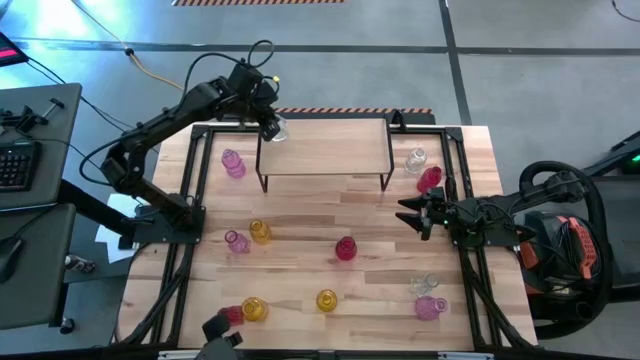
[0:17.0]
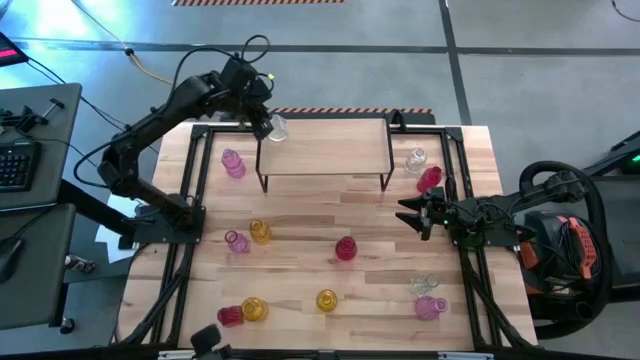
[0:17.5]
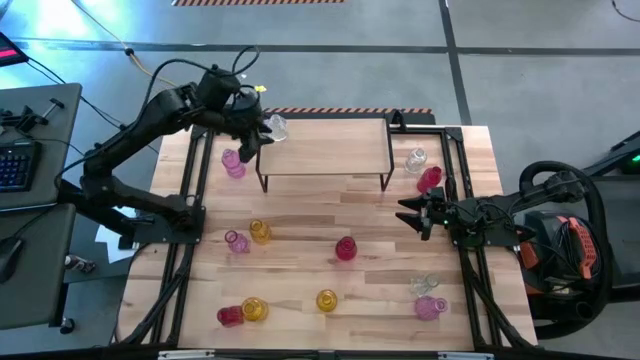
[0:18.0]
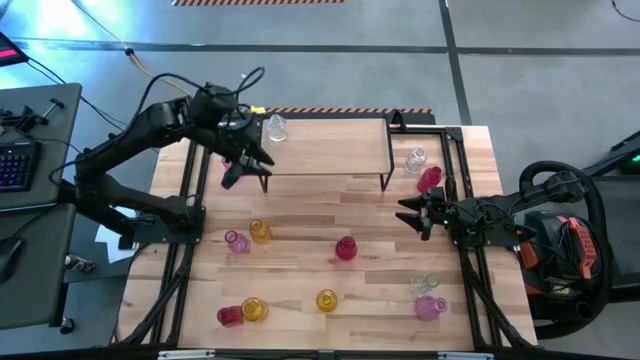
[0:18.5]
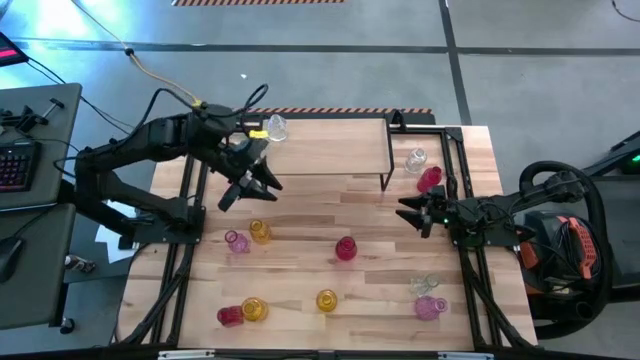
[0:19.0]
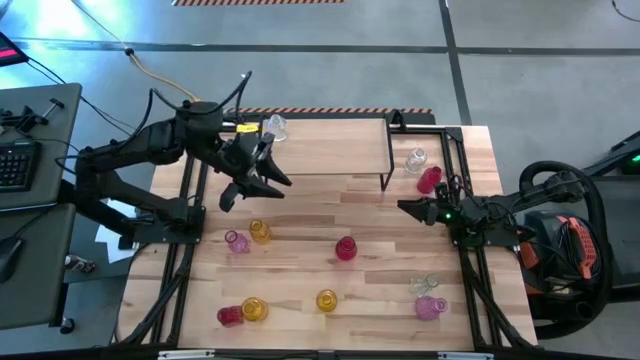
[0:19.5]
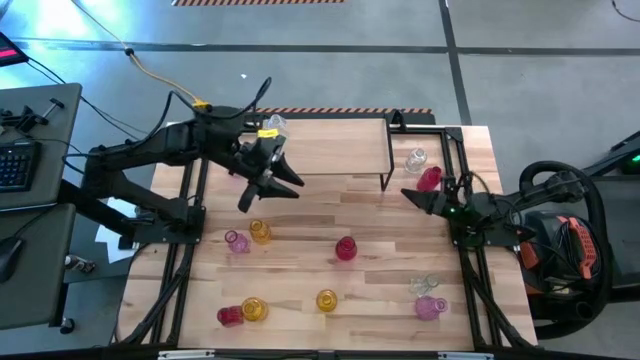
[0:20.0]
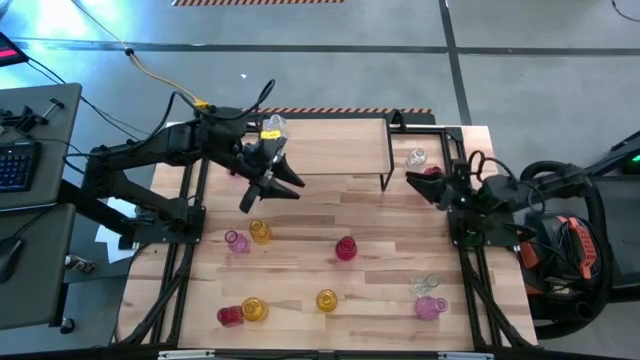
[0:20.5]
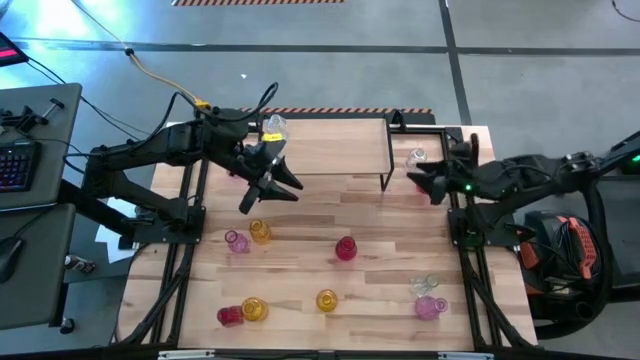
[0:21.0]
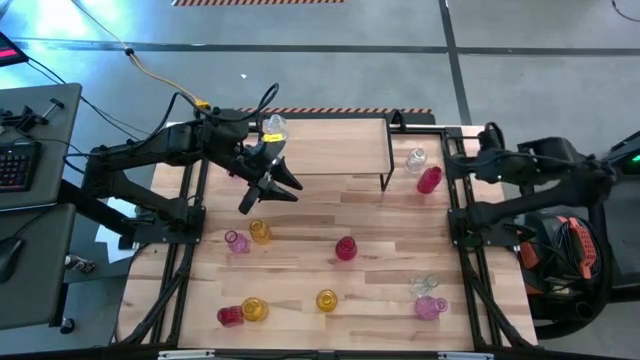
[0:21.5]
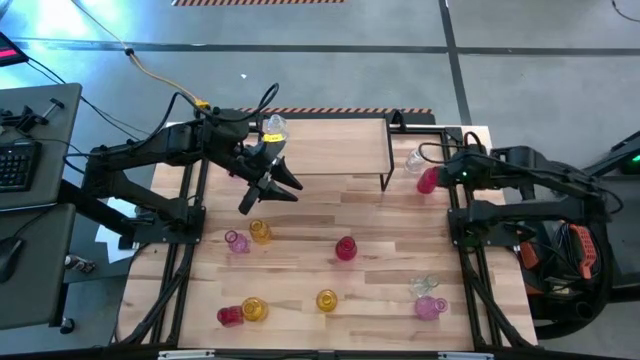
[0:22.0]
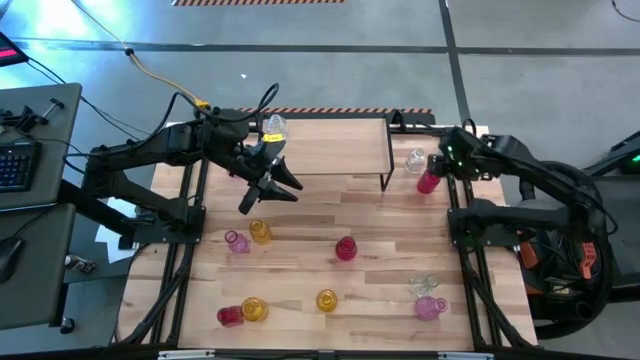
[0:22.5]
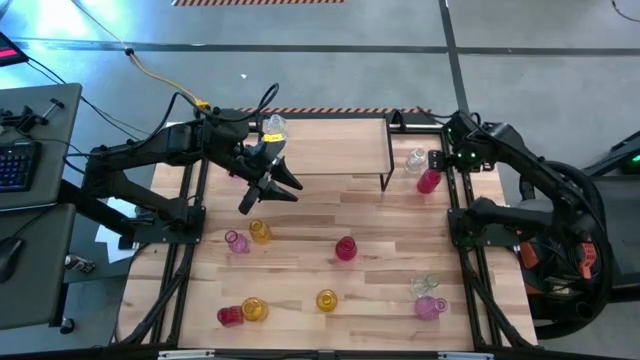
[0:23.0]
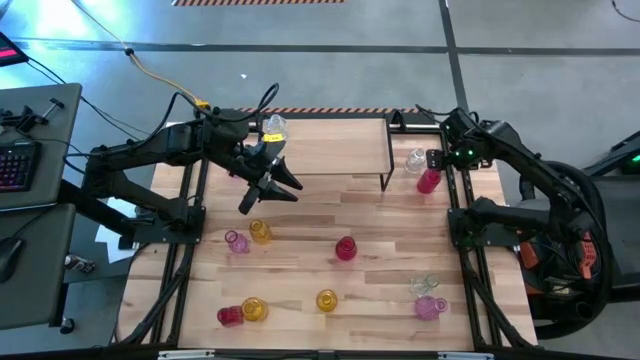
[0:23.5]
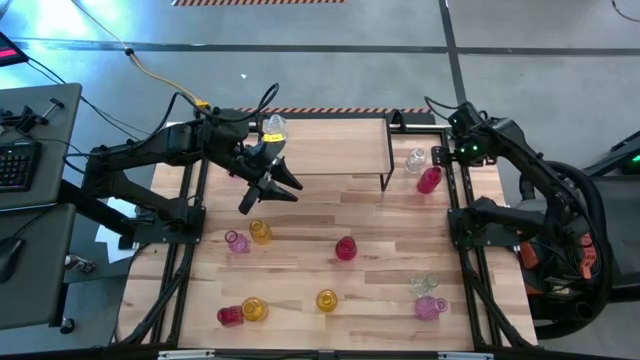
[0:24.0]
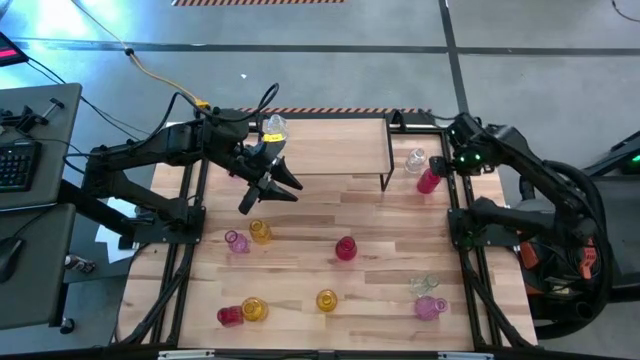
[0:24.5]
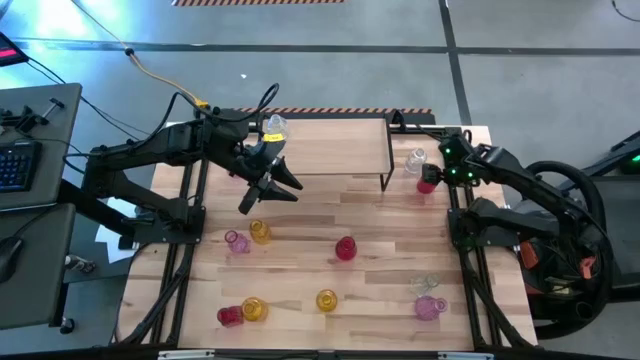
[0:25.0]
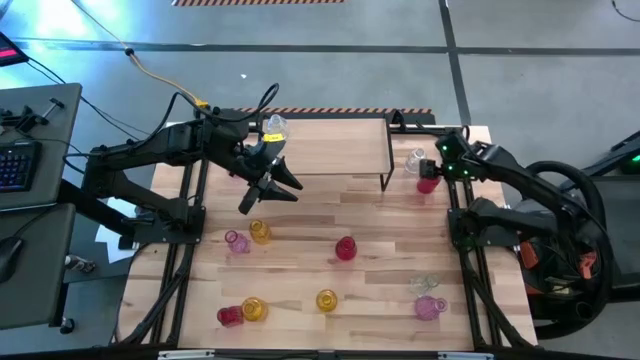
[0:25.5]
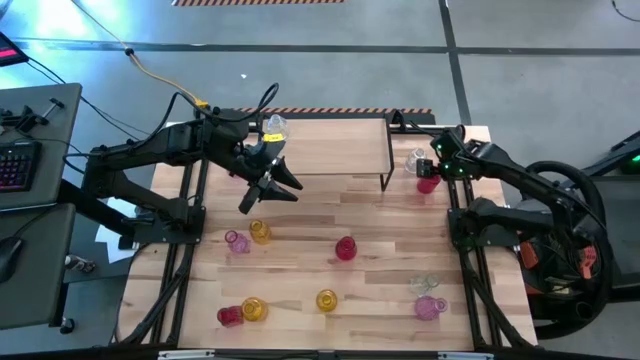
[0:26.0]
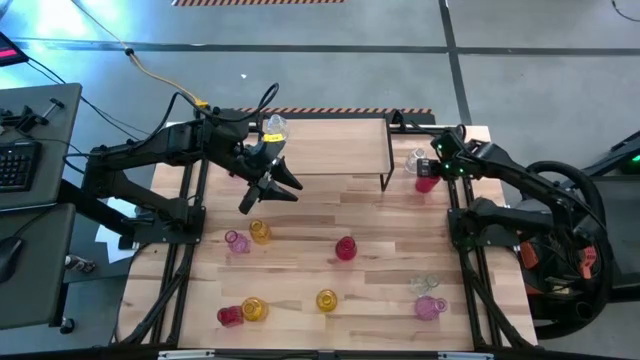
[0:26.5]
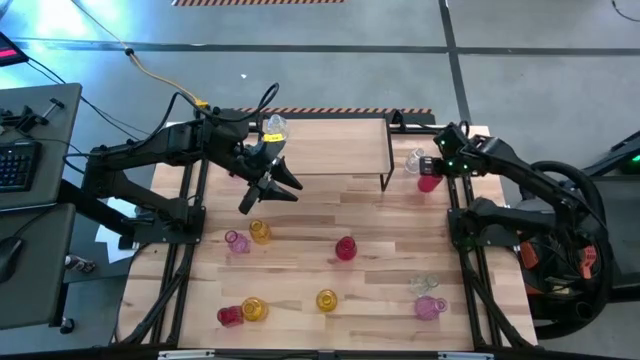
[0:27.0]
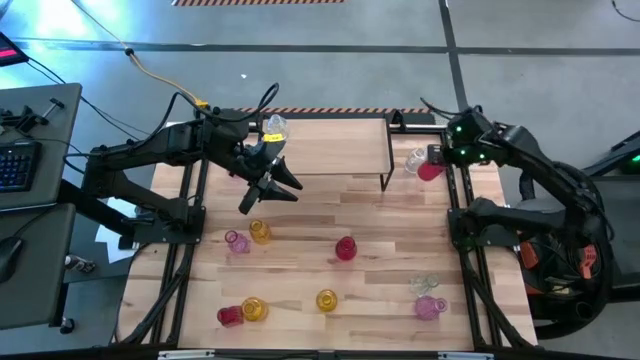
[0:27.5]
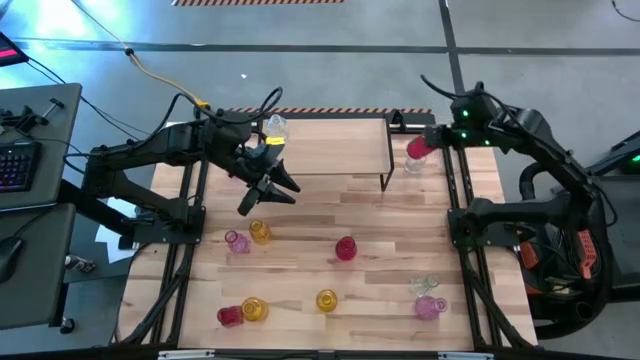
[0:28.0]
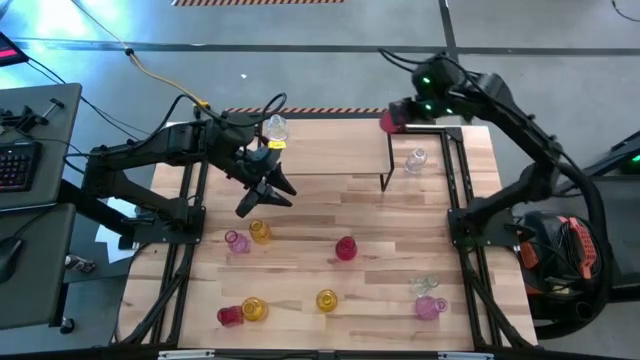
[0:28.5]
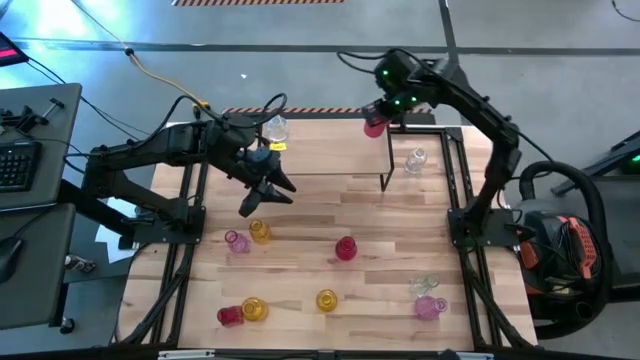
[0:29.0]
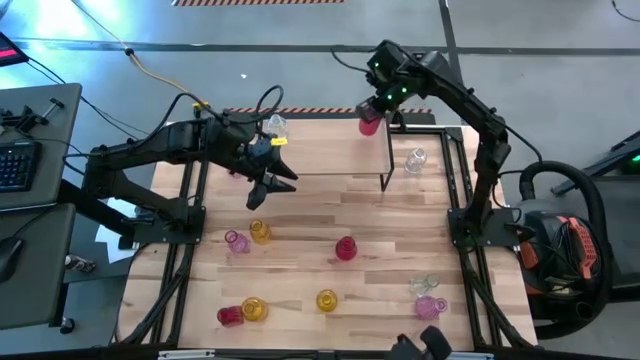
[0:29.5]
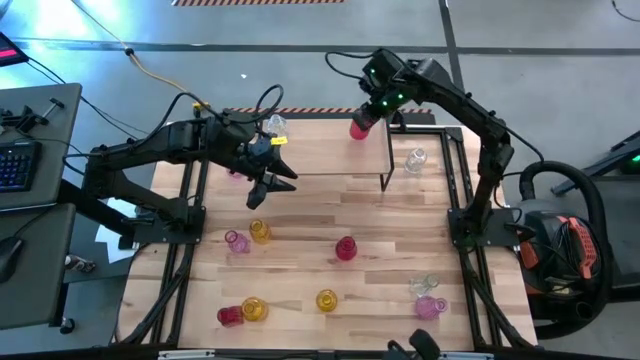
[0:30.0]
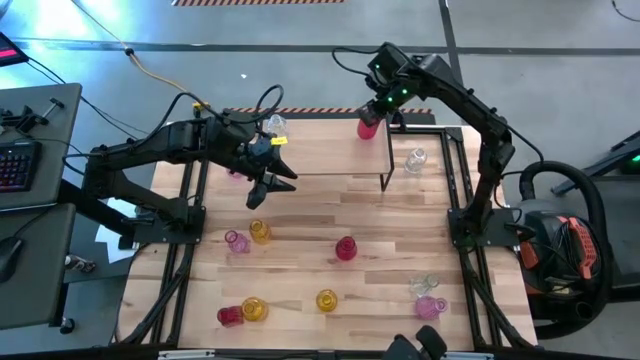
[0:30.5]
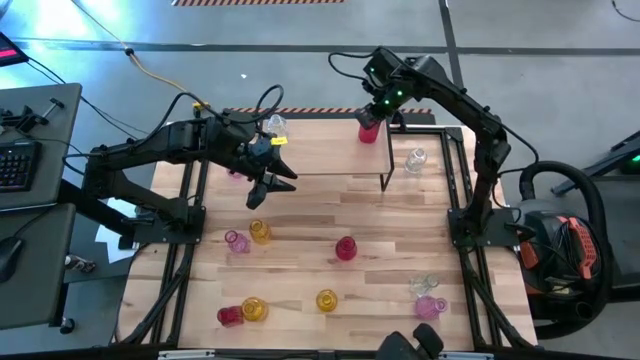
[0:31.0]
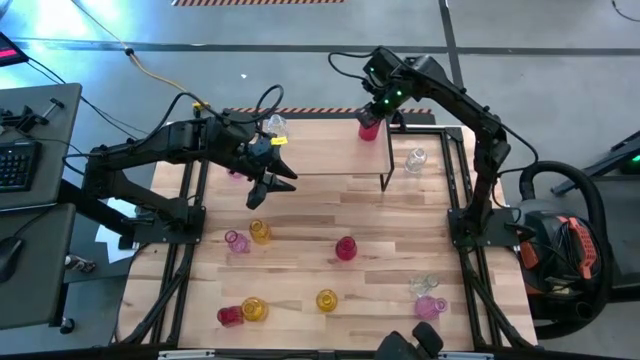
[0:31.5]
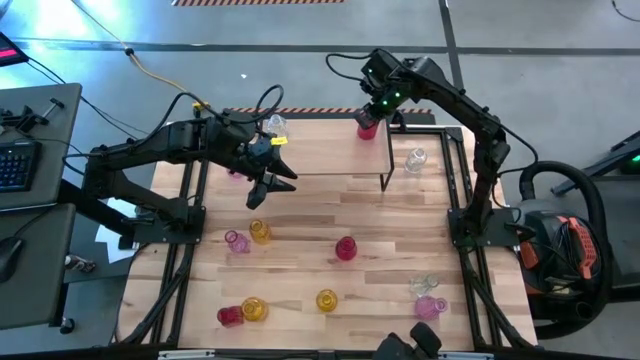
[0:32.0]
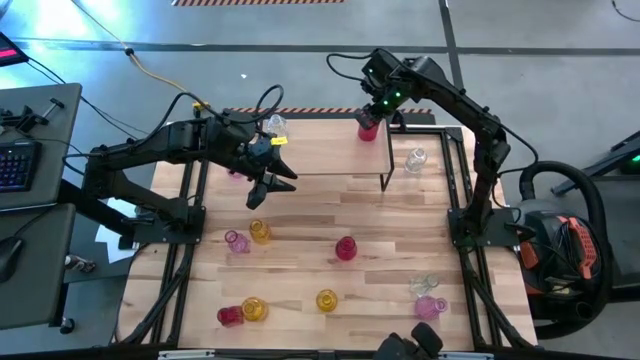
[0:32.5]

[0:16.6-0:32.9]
Task: sort vases onto shelf
Put the top red vase on the shelf
